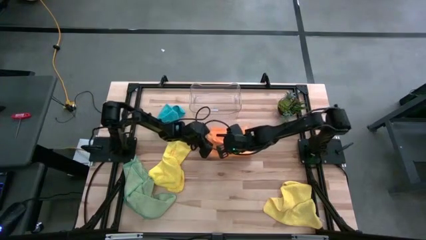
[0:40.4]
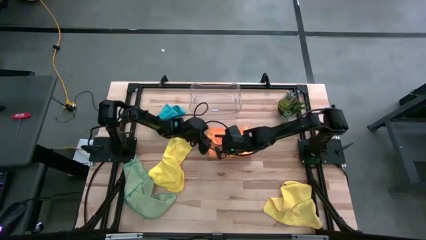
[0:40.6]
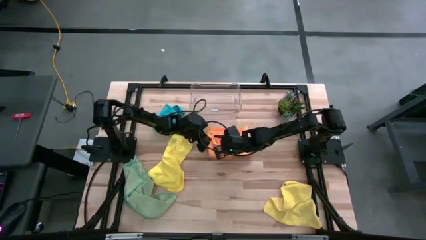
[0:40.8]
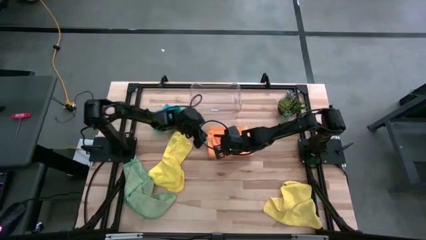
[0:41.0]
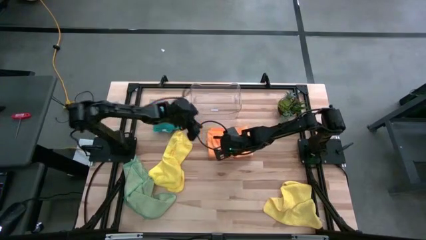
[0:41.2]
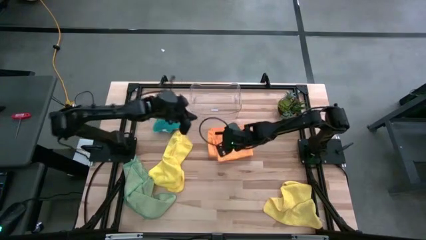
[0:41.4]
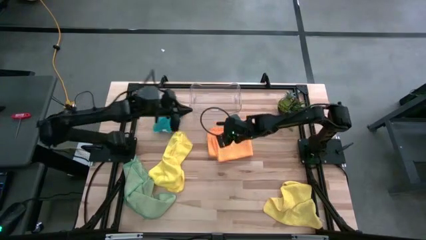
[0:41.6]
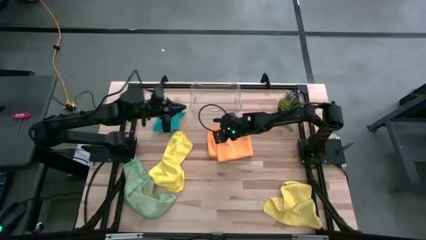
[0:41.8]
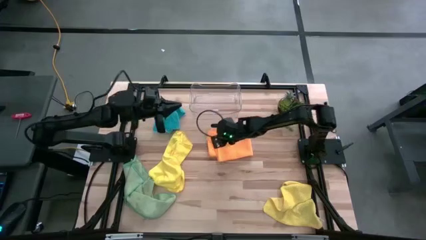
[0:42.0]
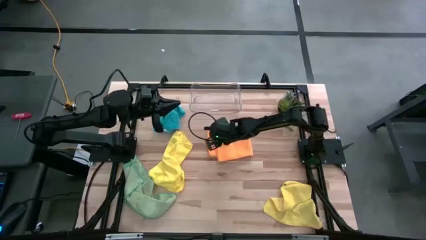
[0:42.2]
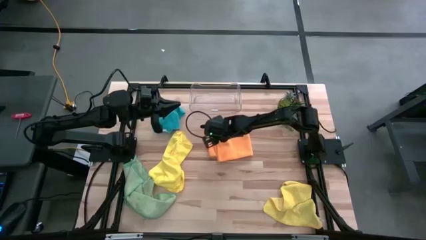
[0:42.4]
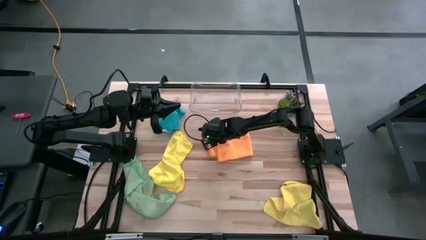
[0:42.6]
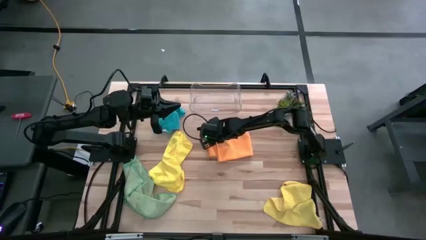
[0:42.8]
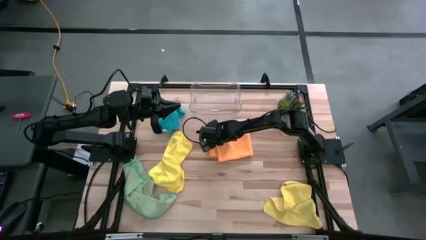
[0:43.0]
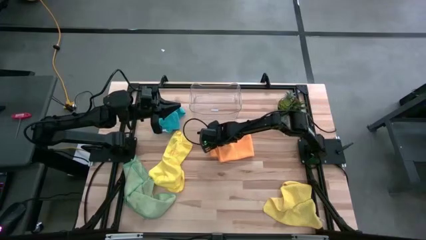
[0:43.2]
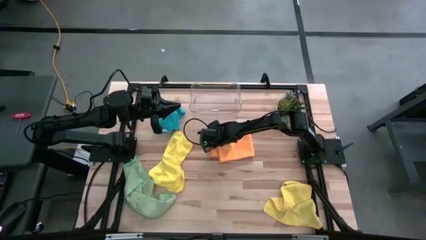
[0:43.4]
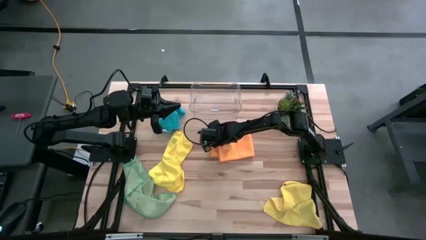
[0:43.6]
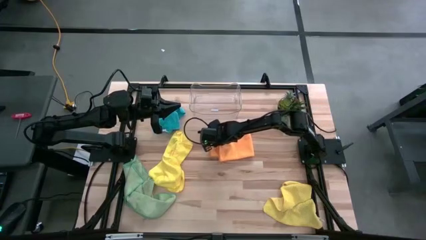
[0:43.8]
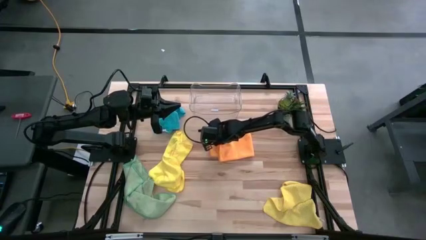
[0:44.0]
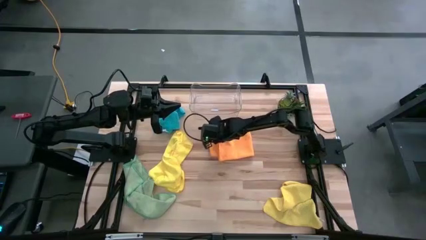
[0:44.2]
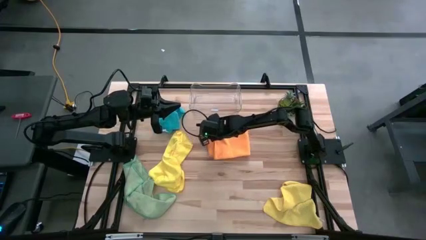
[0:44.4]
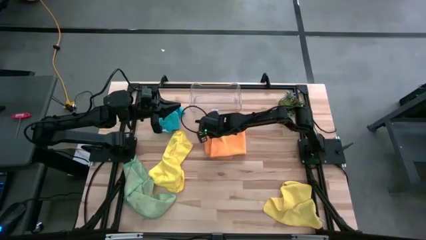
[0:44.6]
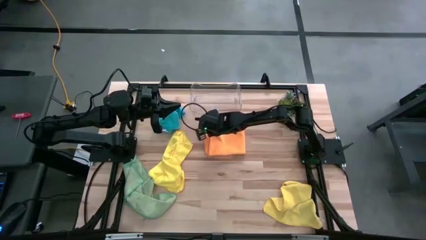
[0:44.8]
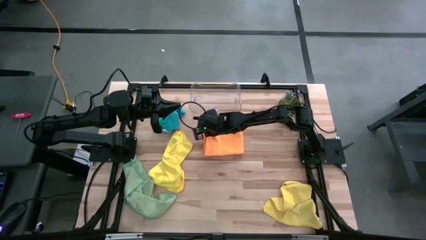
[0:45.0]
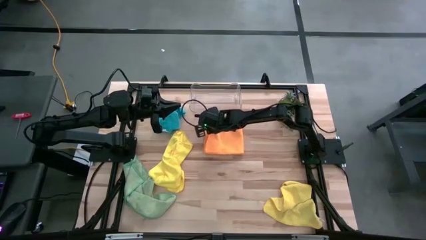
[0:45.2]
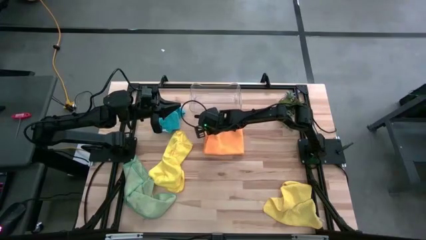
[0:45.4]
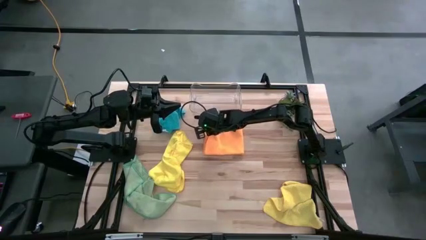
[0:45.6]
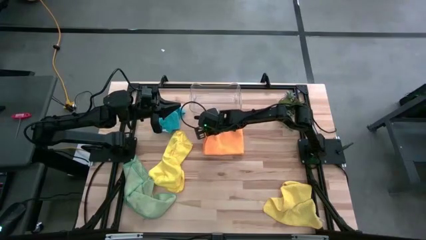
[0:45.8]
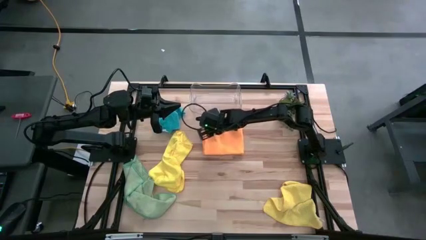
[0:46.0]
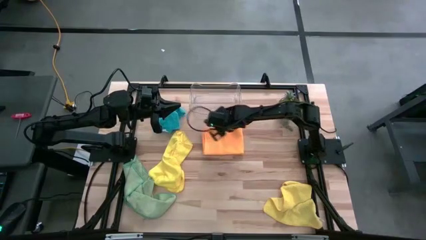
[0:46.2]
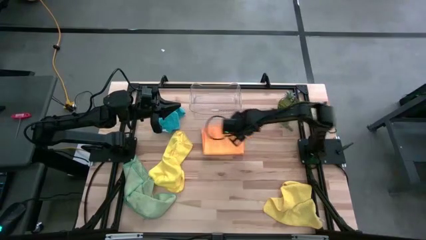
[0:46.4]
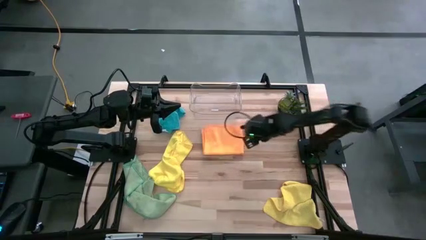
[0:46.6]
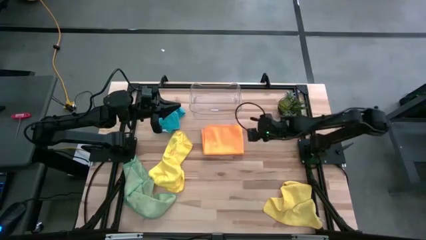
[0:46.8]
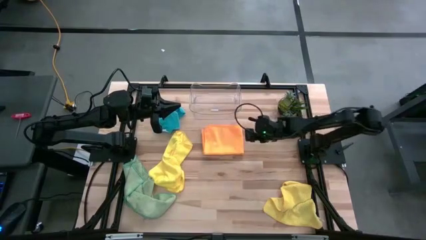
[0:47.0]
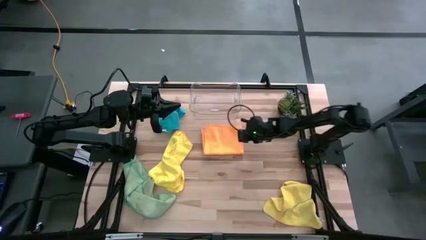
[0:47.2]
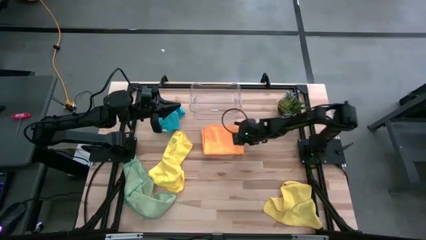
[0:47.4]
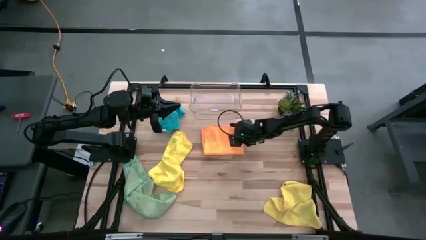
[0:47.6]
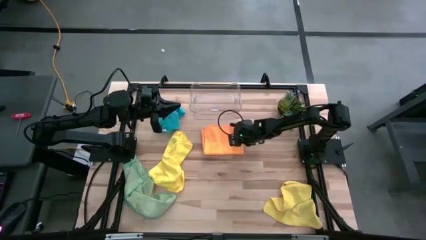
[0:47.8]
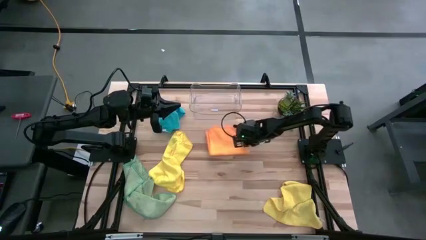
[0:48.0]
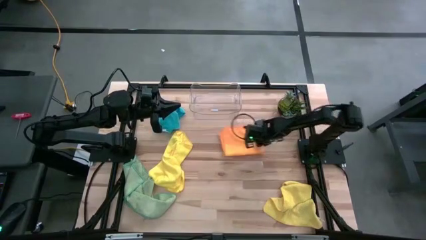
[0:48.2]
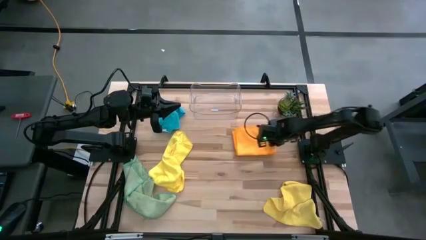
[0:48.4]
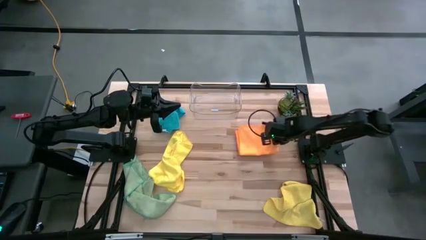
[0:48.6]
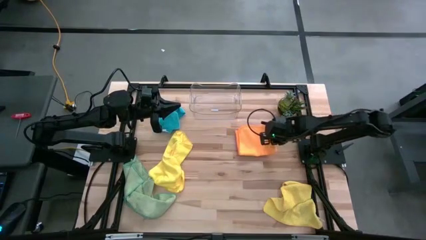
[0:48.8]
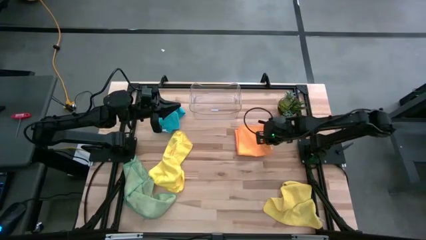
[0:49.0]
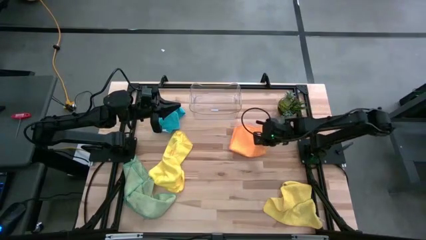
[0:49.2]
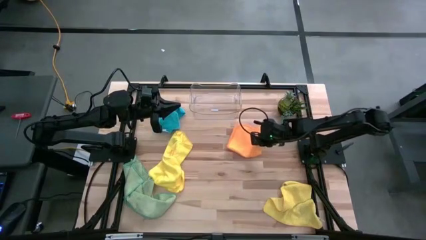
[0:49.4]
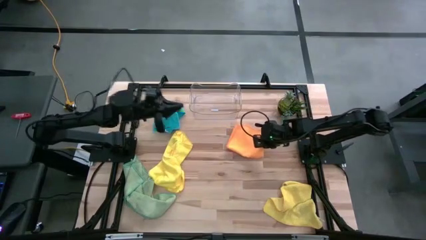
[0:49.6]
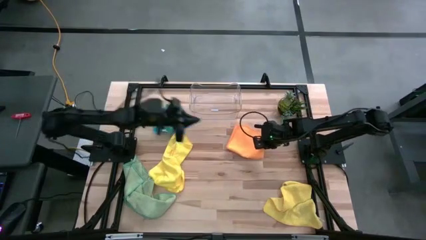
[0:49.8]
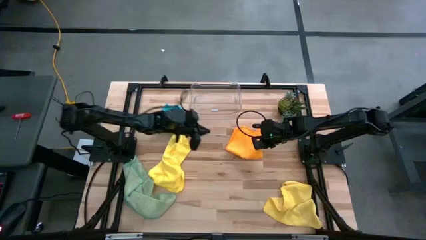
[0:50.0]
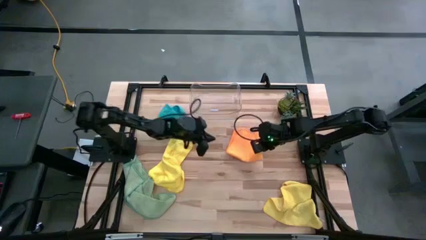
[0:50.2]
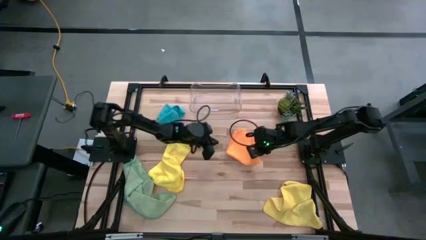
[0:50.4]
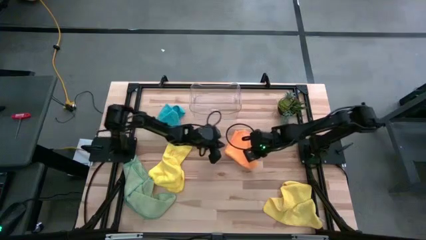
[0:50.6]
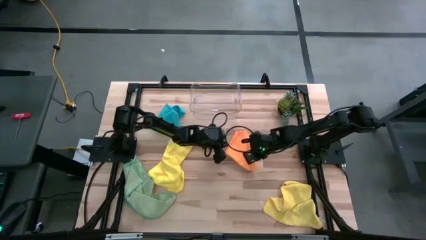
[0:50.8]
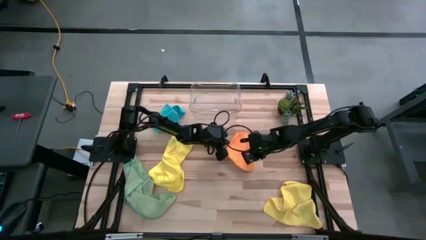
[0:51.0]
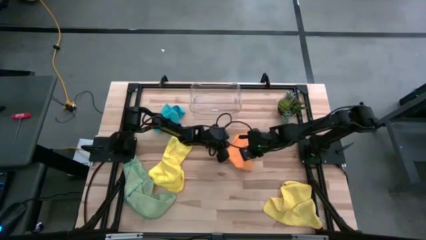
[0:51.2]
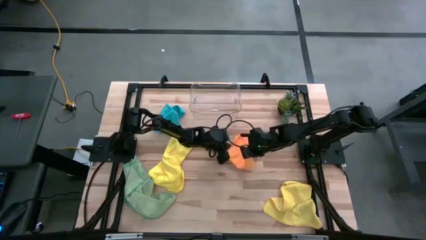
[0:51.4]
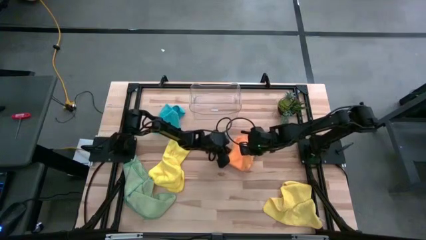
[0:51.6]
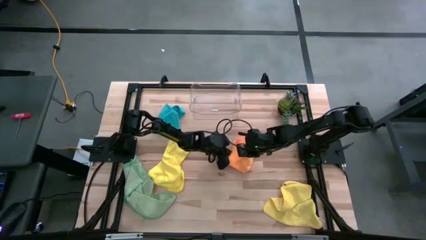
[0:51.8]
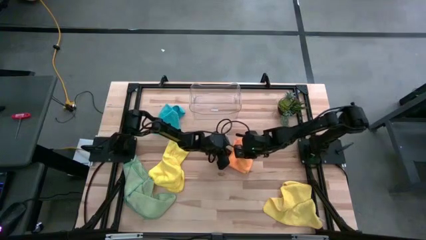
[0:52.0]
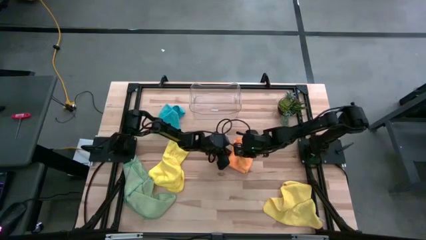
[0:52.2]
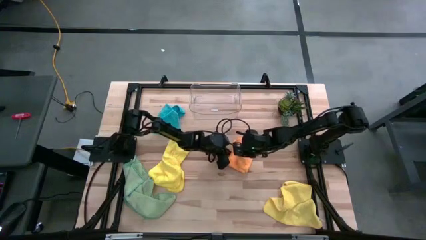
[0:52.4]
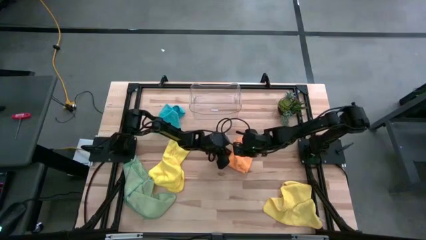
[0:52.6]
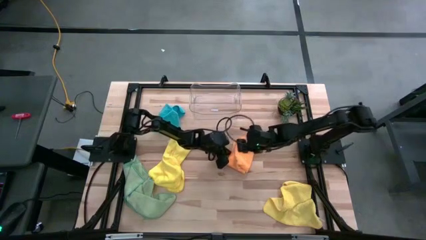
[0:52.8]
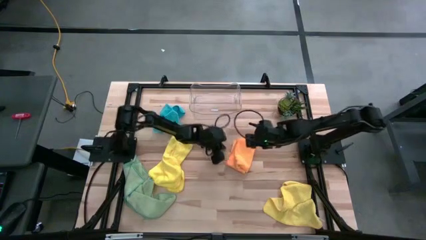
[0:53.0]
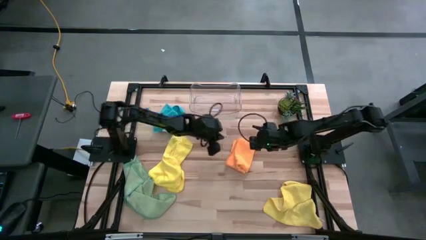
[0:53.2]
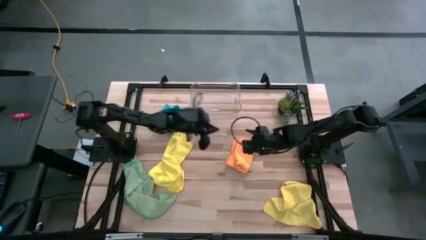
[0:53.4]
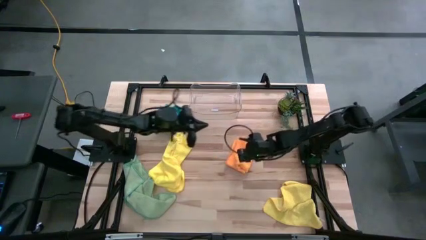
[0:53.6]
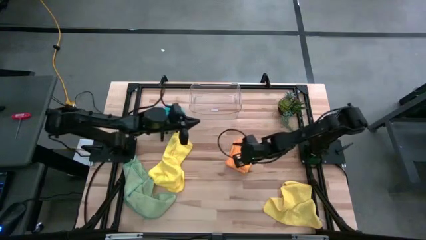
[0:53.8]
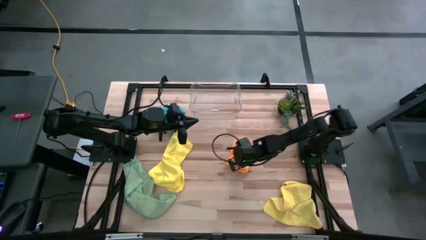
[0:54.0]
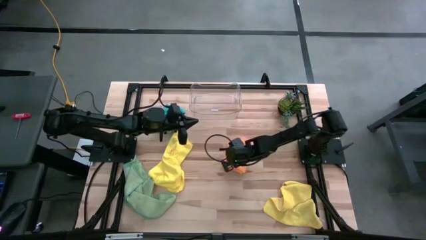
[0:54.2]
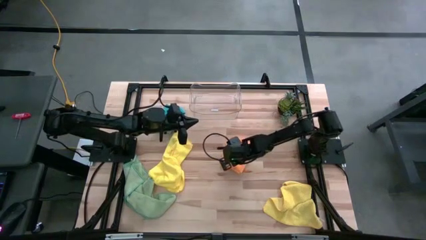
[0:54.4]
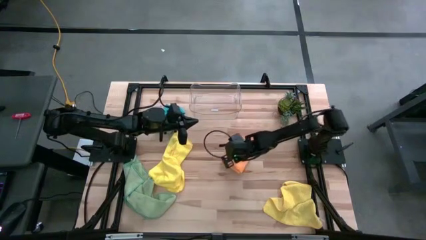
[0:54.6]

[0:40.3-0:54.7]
Task: Fold microfiber towels
Fold the orange microfiber towel

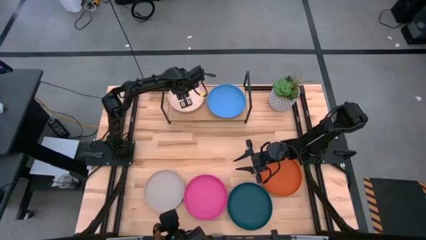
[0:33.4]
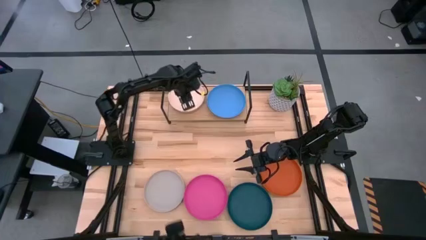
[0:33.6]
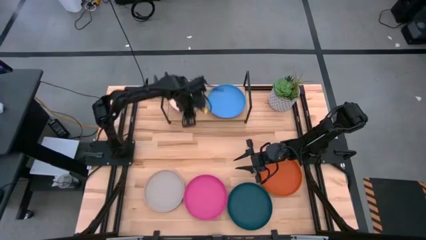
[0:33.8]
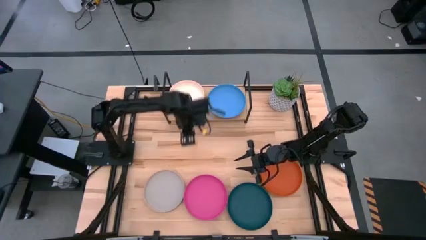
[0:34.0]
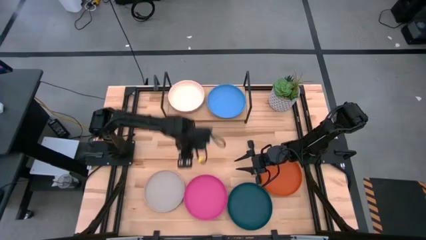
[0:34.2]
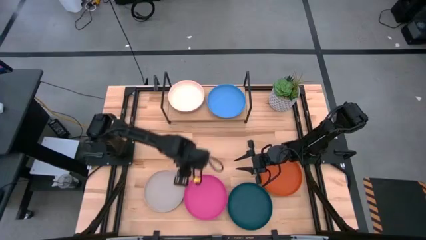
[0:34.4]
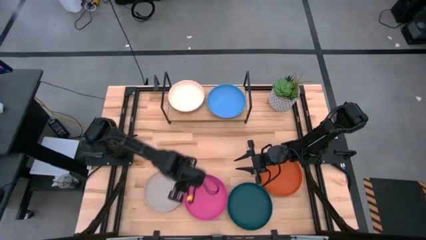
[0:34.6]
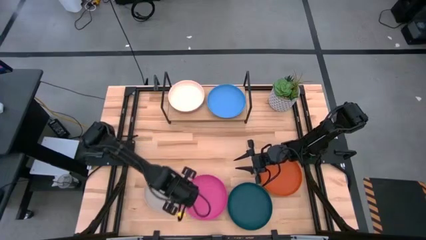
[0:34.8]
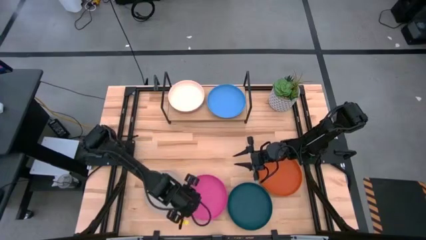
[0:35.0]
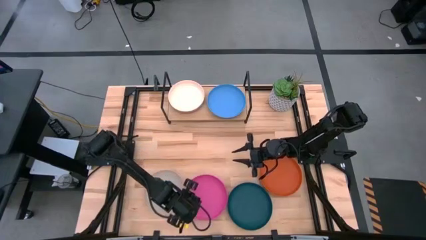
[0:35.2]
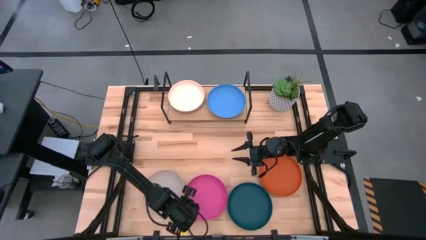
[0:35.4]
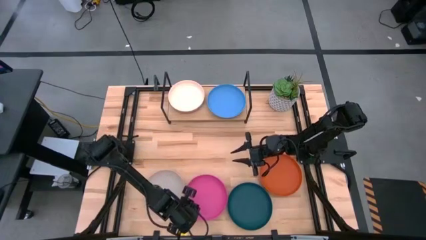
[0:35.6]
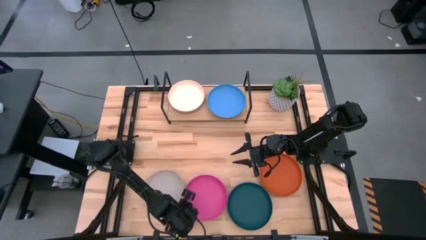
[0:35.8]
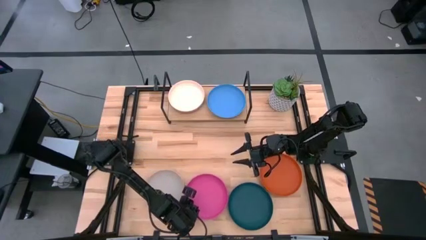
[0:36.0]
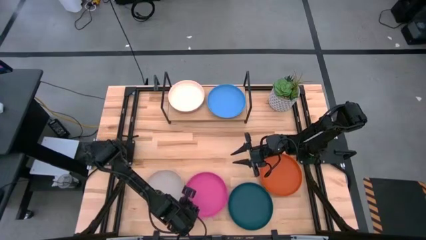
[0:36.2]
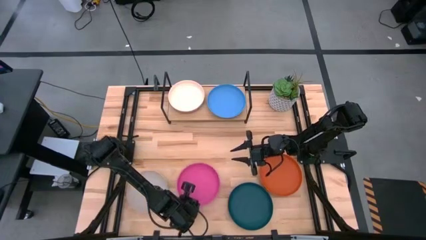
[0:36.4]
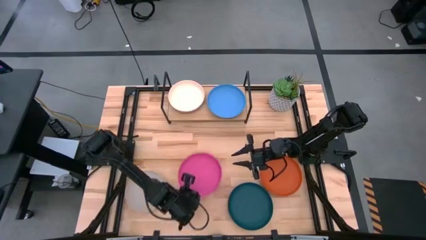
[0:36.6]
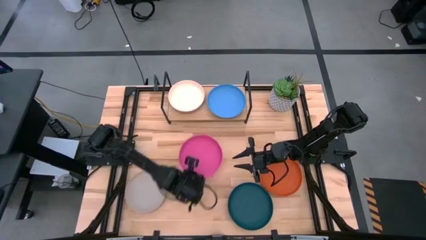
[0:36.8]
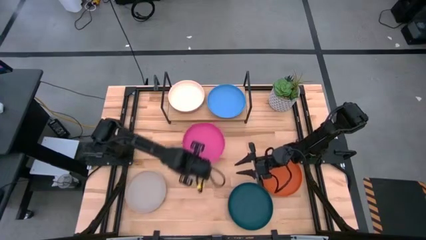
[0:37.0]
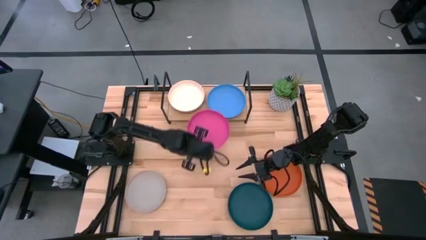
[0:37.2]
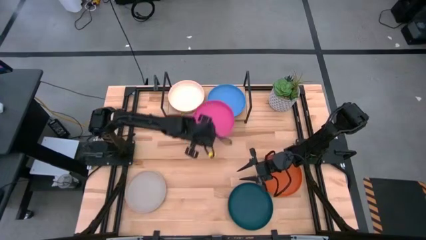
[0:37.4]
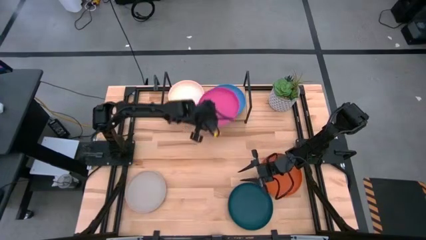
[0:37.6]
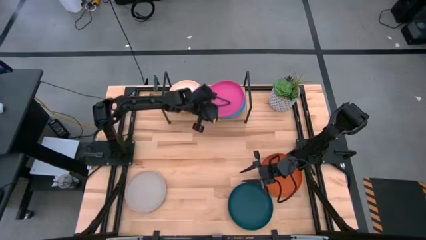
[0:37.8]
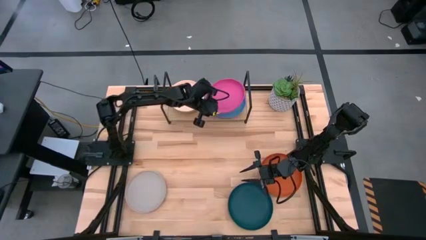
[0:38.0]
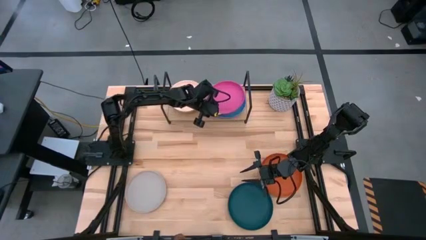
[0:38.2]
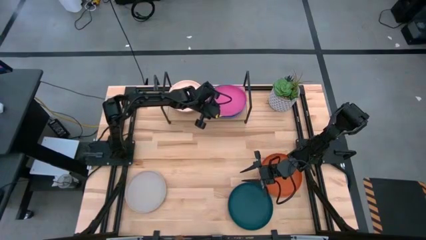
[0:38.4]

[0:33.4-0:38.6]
Task: Place and stack plates onto a shelf
Stack the pink plate on top of the blue plate on the shelf
